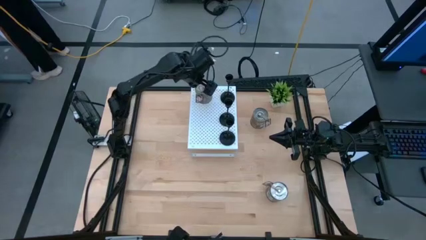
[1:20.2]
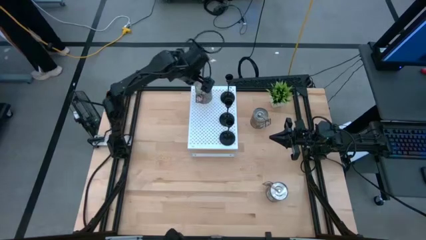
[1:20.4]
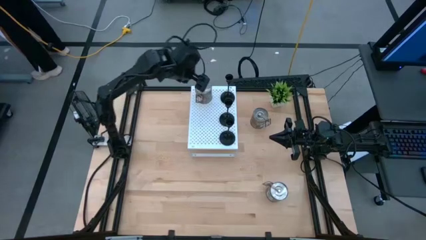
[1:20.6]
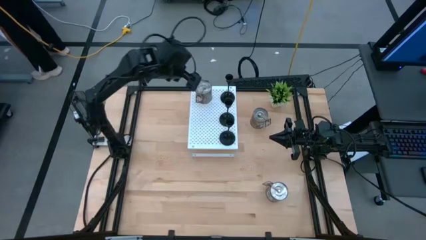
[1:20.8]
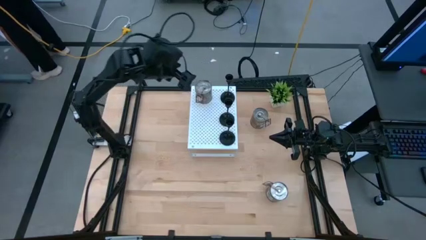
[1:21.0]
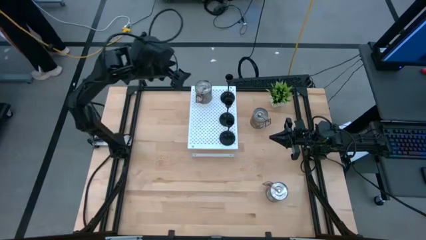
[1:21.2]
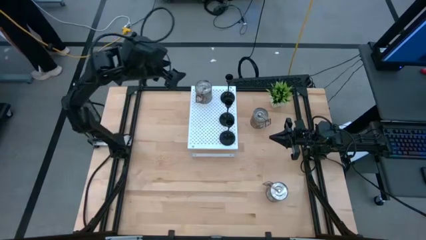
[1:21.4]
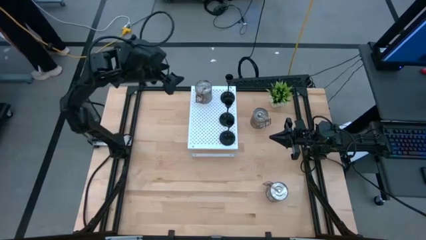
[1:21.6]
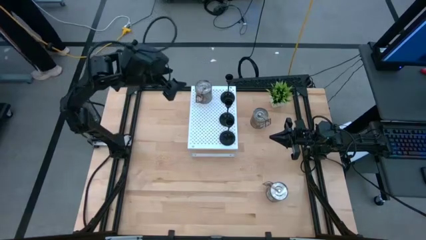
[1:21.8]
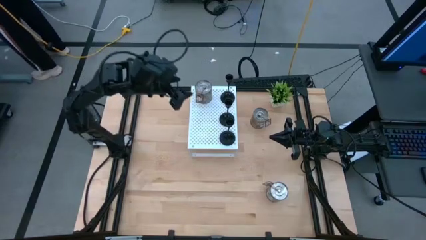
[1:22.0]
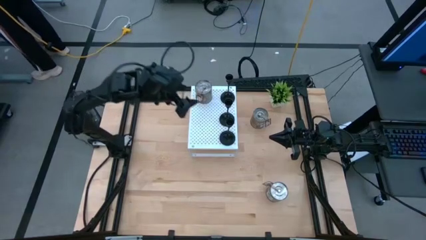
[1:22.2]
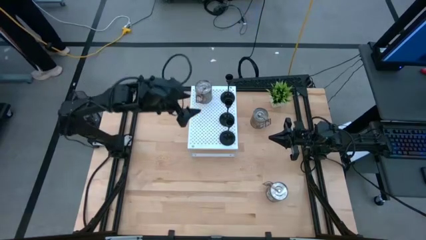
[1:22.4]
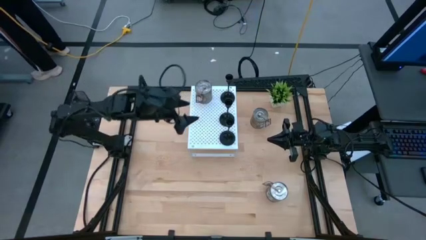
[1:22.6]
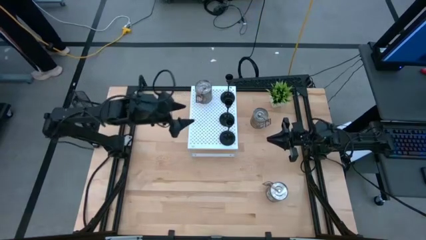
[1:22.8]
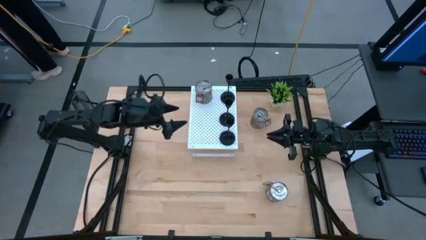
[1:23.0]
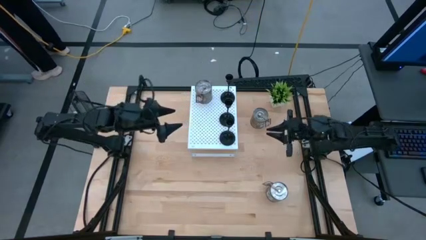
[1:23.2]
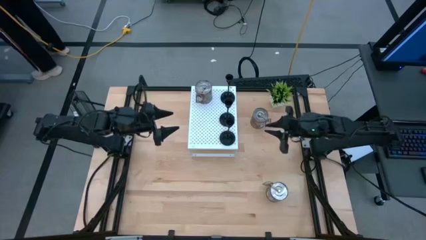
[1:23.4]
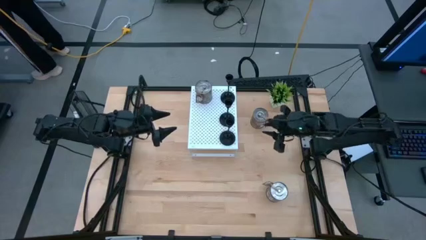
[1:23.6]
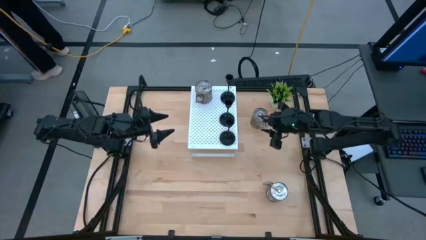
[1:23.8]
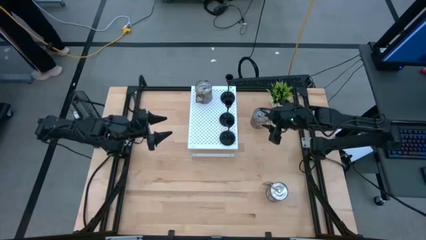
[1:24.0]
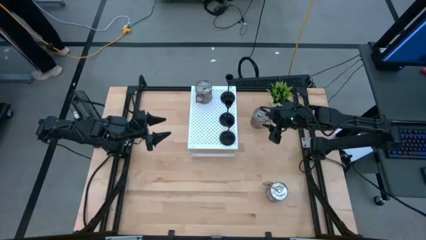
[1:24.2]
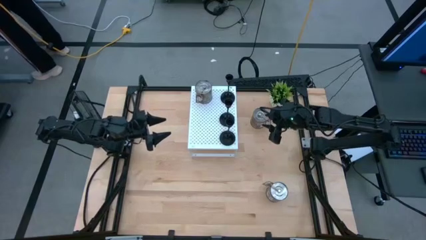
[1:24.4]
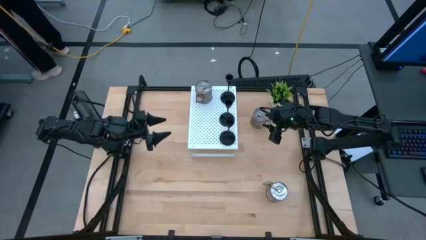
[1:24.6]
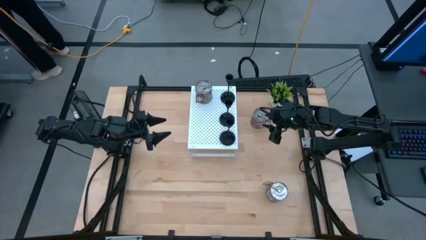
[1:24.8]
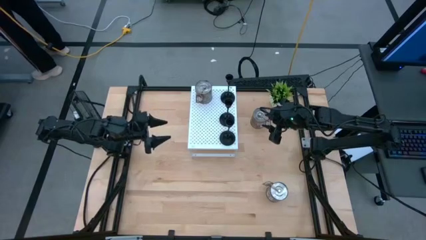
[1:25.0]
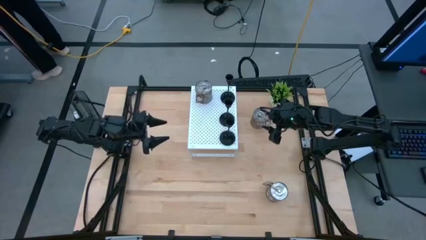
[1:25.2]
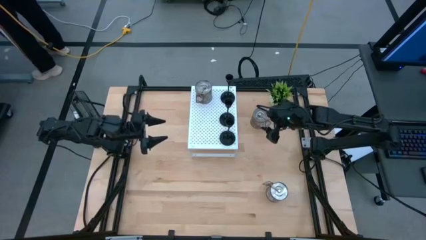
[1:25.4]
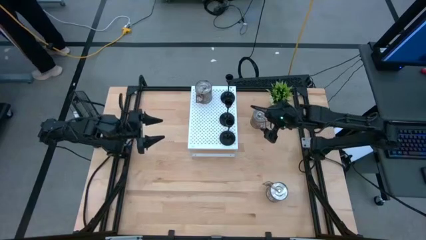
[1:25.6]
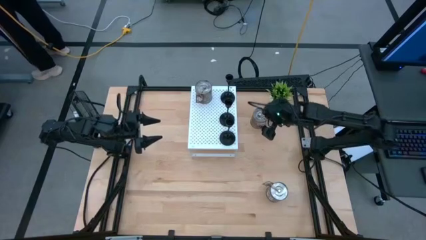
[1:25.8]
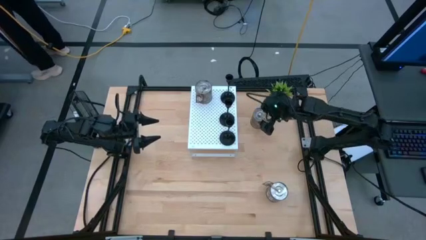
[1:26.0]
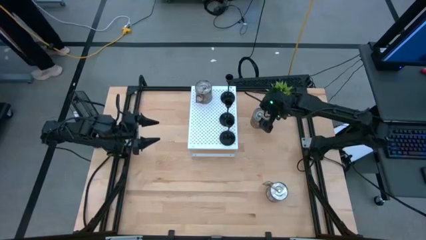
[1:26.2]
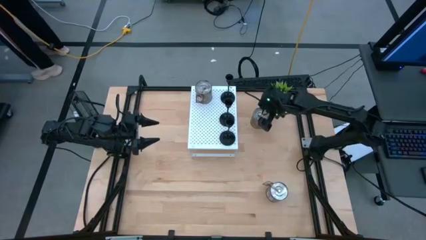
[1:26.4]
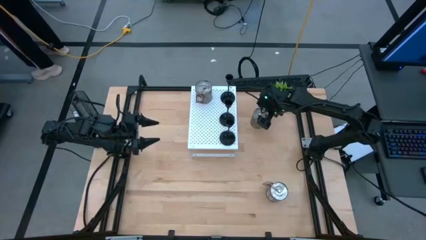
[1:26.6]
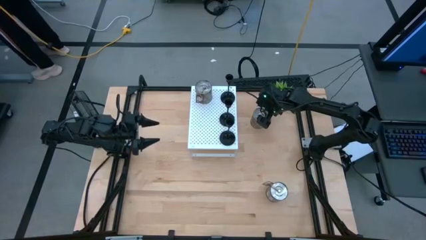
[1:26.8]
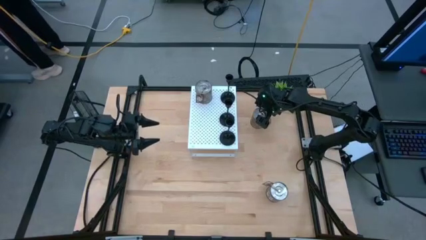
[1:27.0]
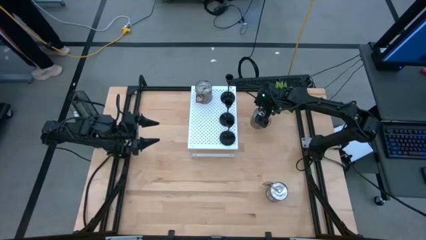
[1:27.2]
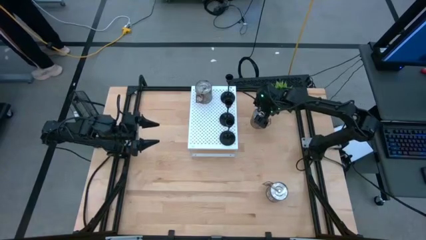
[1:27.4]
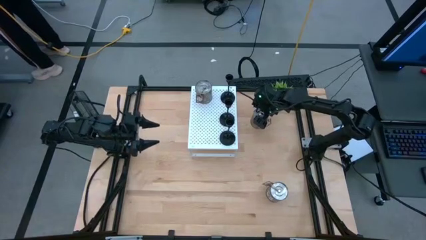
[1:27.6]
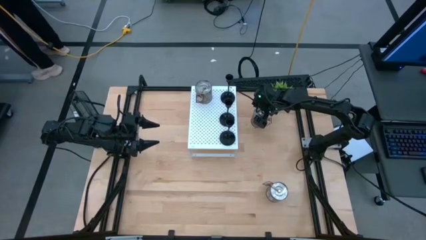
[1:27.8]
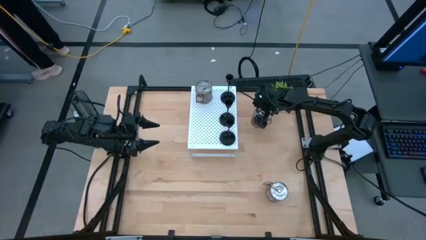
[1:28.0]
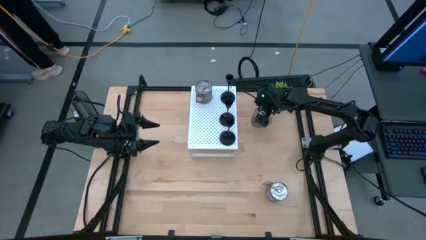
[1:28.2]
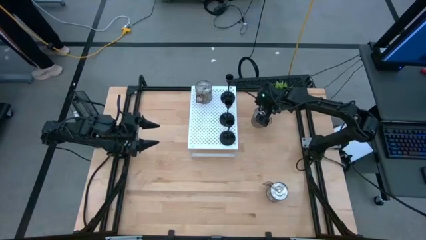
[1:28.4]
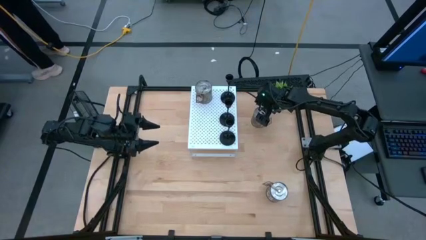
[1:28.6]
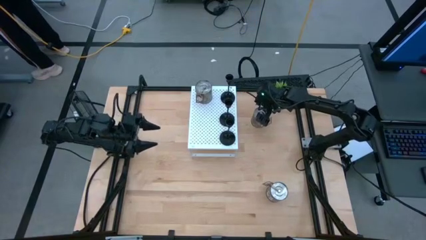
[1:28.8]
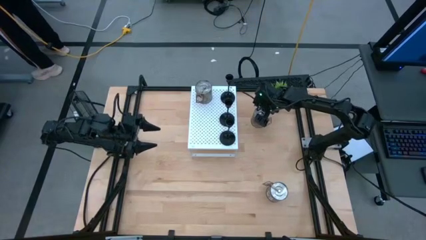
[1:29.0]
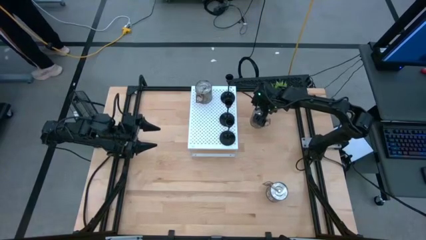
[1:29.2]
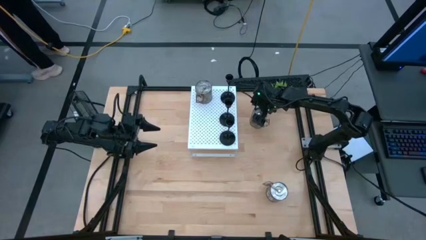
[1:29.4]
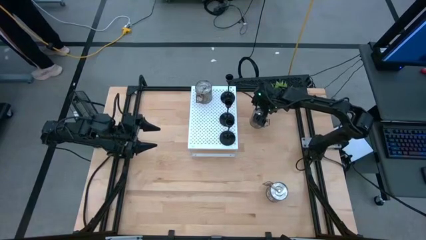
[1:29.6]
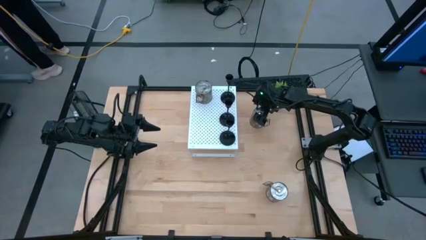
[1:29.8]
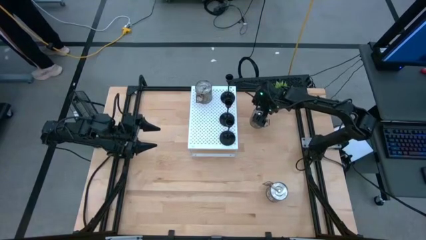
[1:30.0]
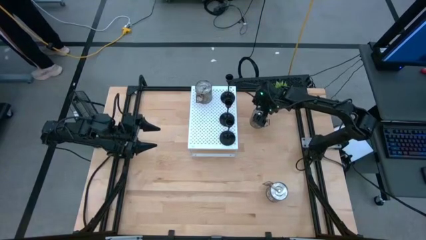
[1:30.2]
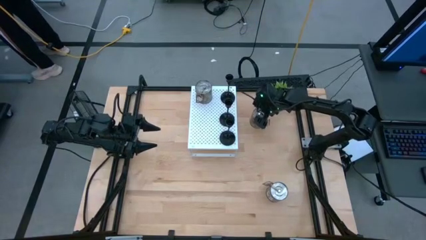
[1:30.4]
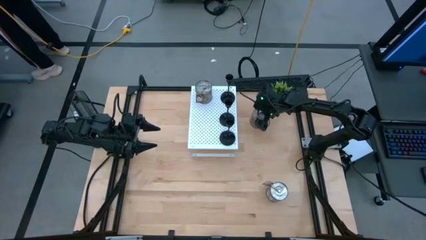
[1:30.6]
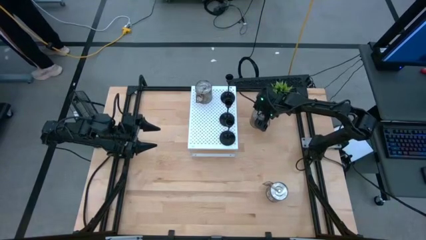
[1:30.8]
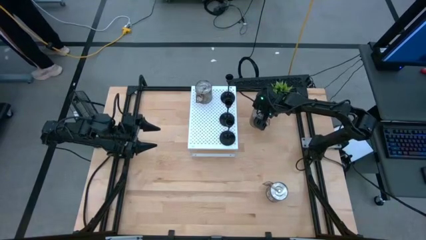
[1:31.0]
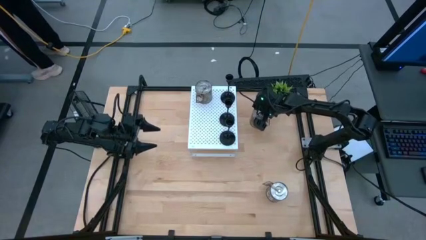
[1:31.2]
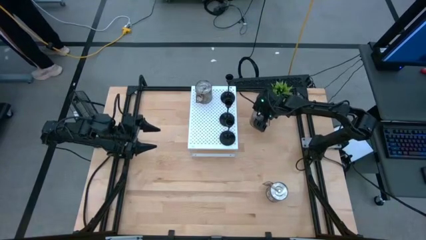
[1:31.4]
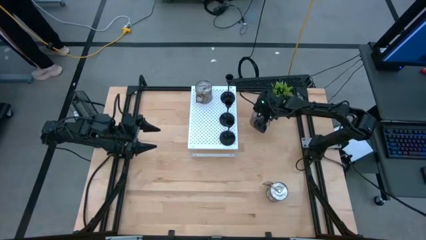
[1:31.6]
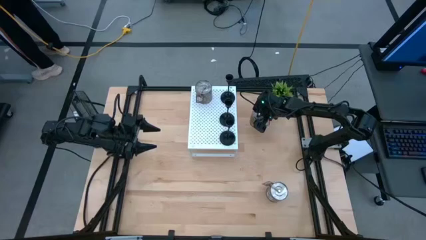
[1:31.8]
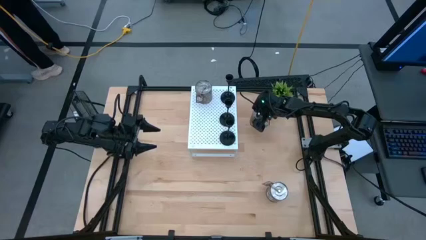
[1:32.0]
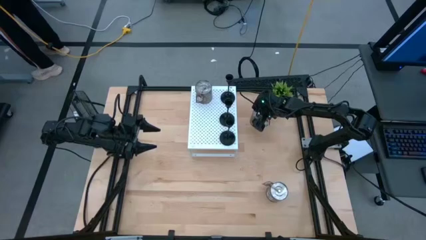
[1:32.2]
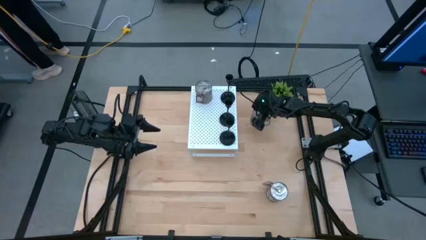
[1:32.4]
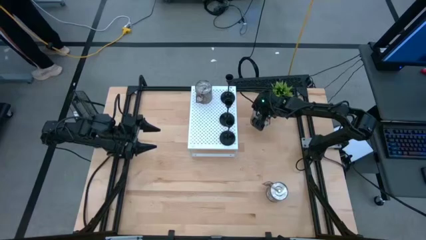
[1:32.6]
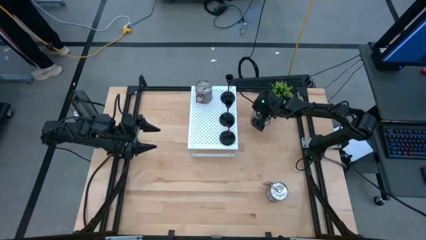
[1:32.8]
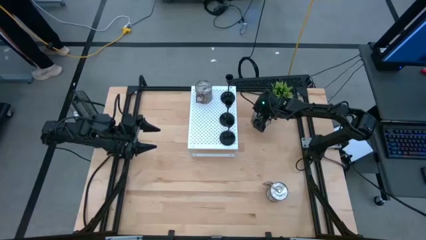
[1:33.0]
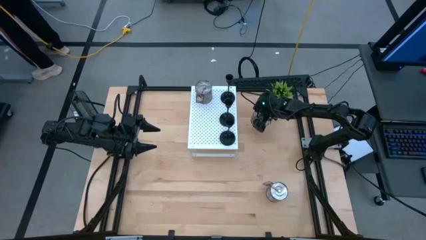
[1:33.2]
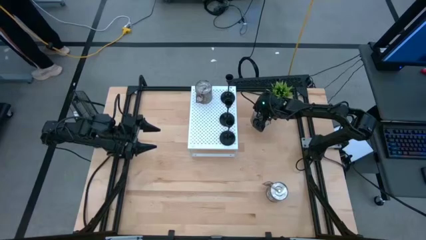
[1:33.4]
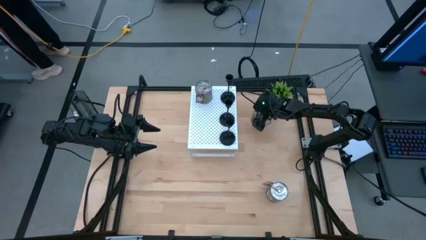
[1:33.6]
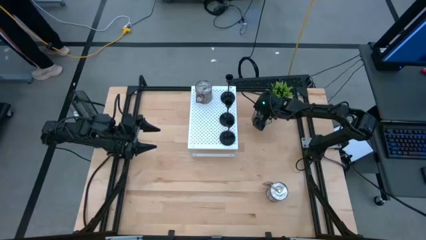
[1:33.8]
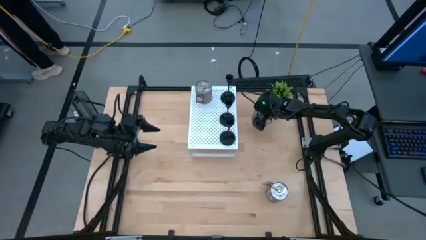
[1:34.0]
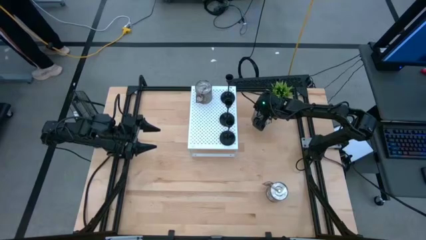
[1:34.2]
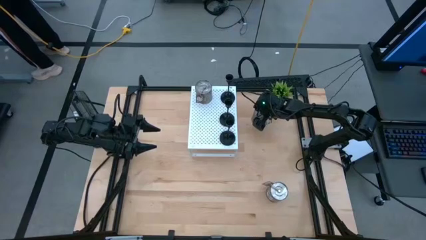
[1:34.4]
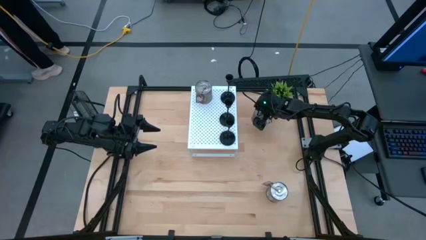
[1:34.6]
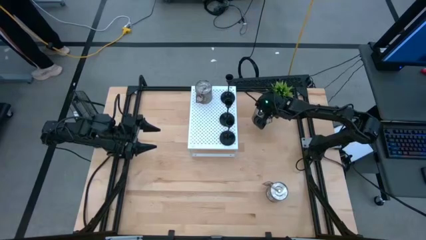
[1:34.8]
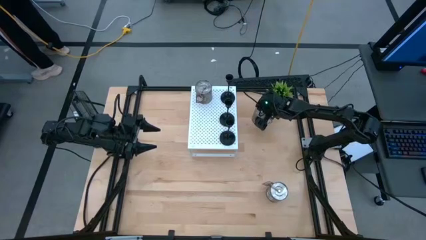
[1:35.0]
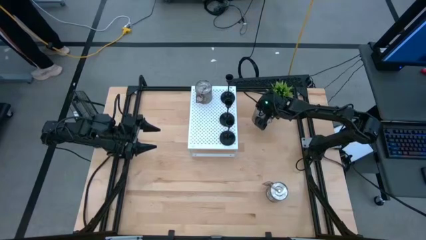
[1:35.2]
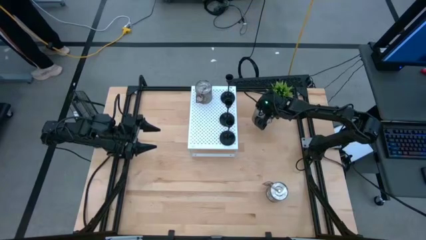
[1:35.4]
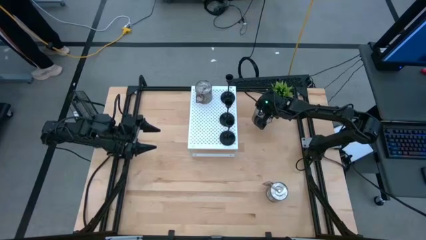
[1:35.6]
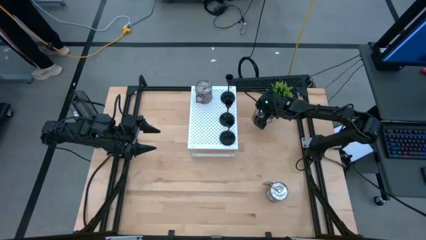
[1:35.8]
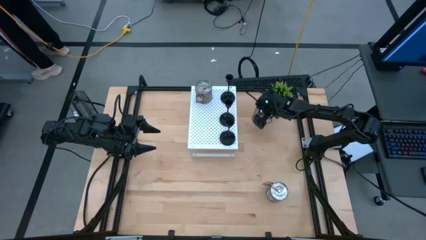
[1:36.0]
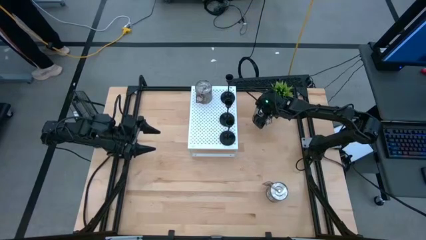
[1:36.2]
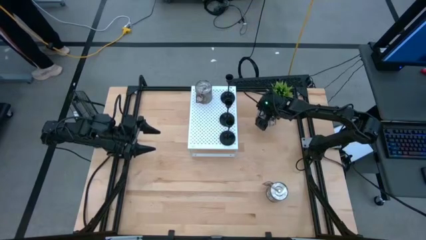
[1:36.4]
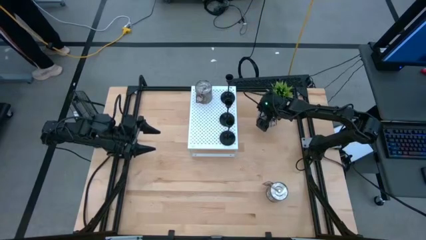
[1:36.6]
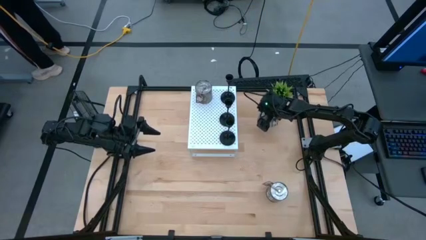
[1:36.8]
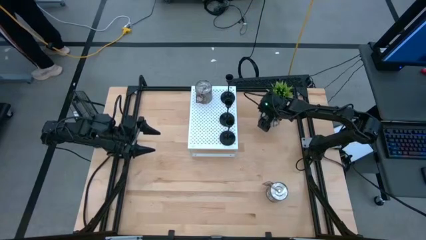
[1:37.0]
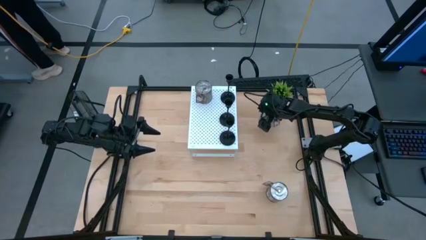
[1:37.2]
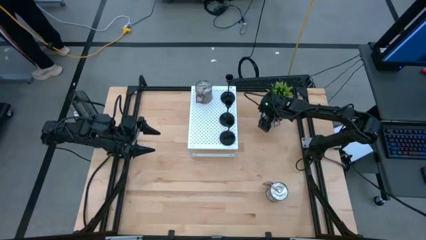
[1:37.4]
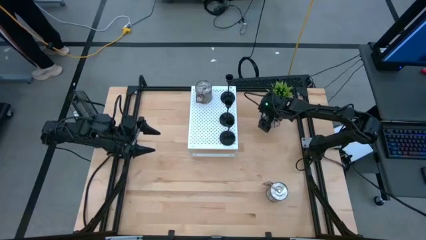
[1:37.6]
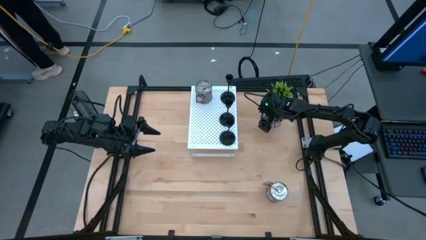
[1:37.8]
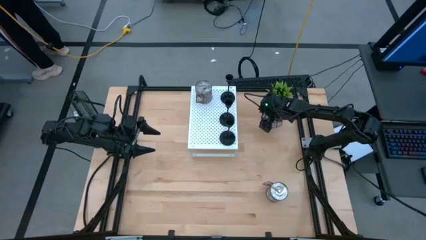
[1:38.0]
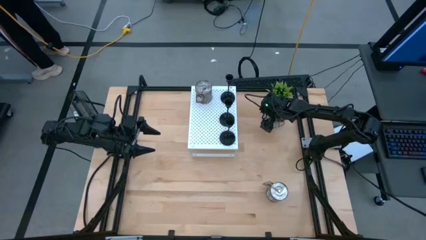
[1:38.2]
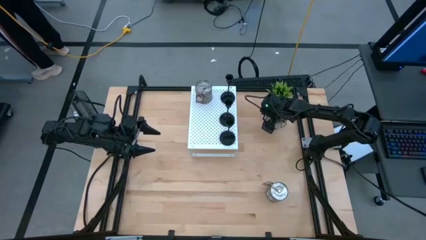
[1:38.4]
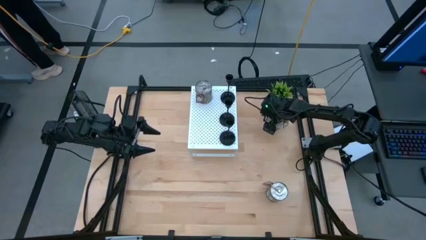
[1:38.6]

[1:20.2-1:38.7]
Task: Pick & Place candle stick holders
Put the top brown scented candle on the shelf aligned with the brown scented candle
